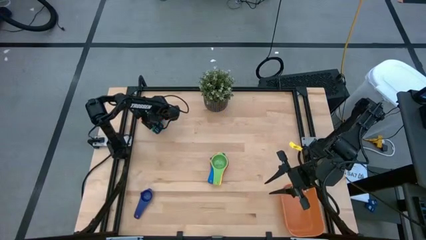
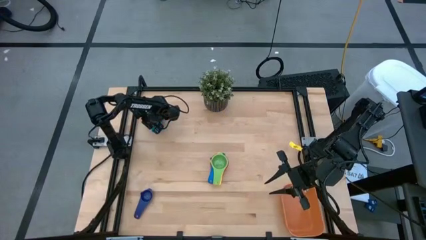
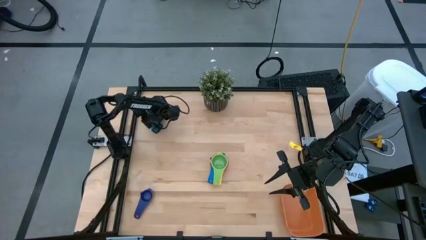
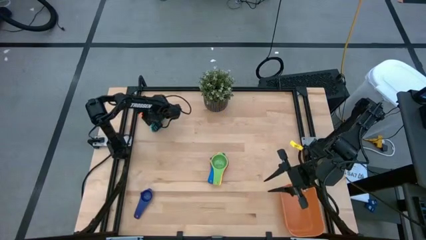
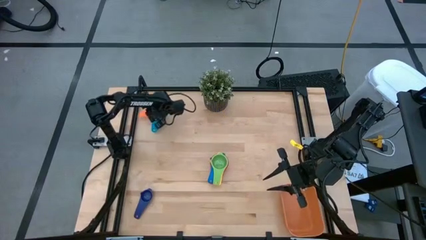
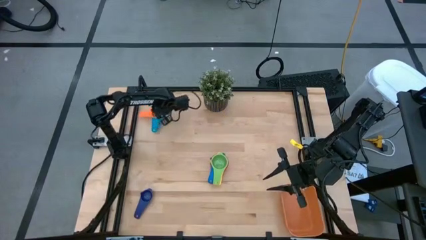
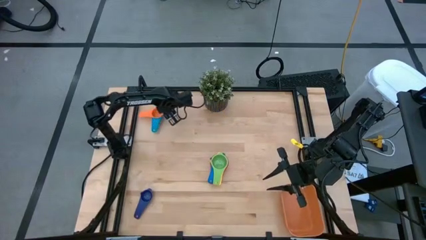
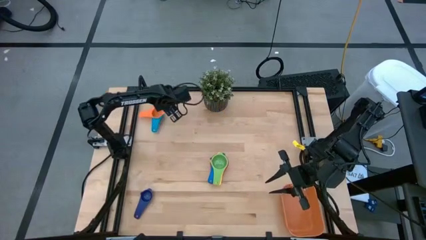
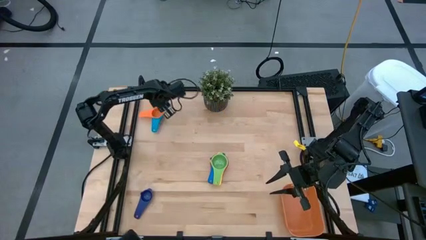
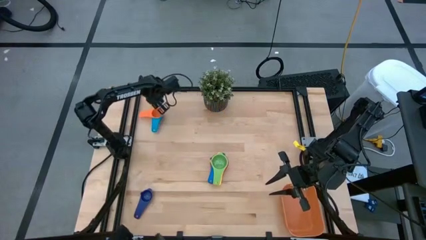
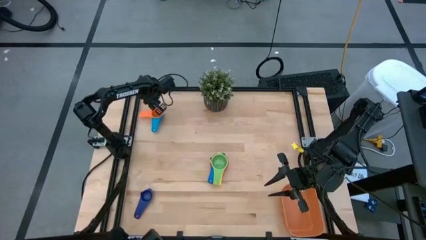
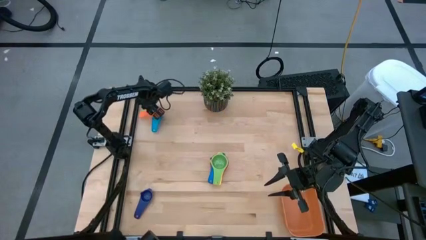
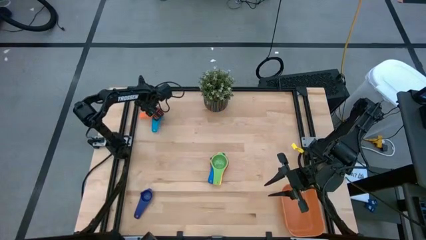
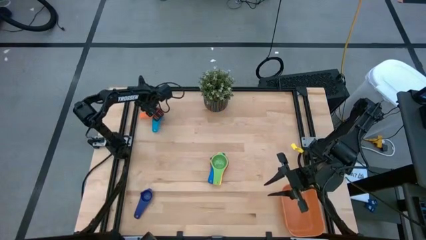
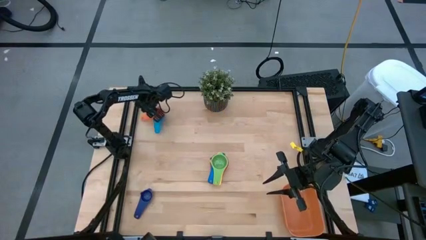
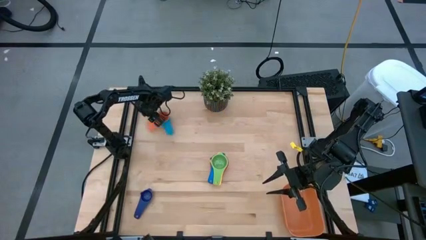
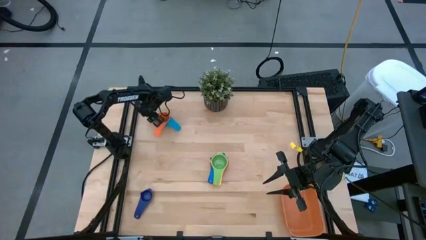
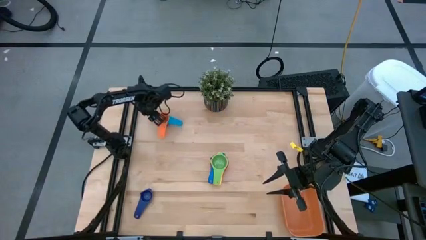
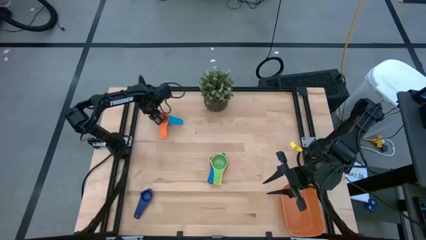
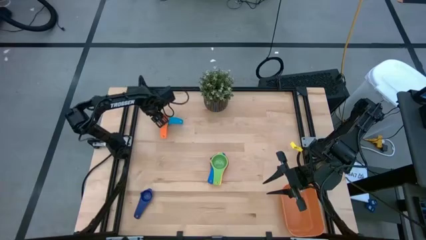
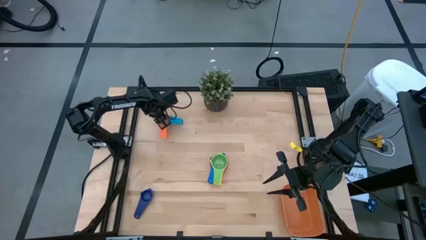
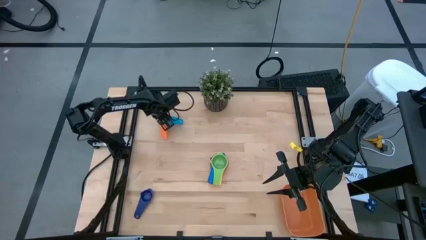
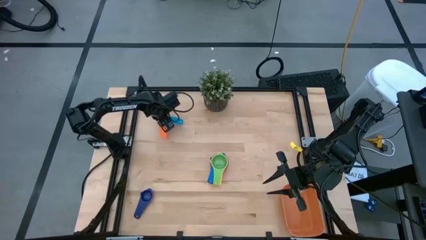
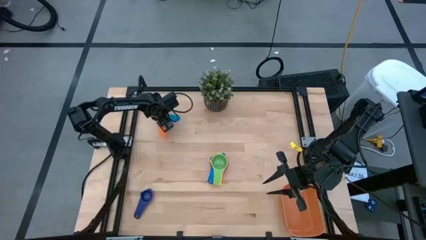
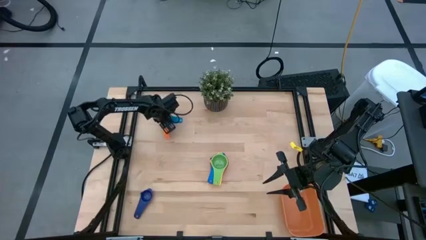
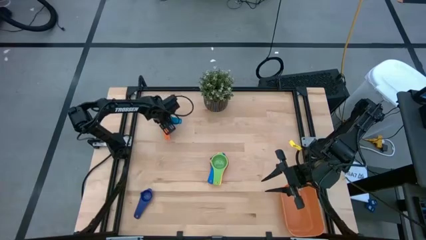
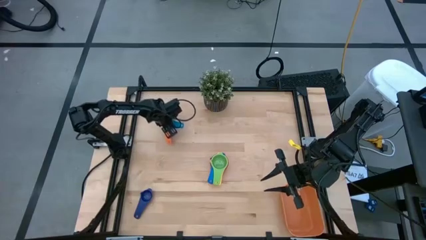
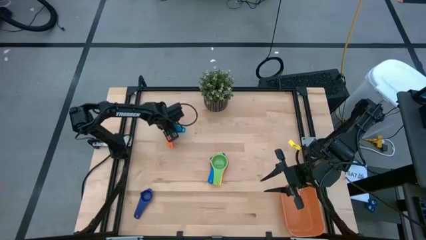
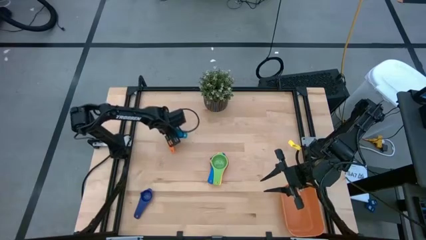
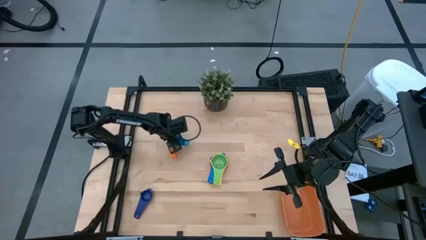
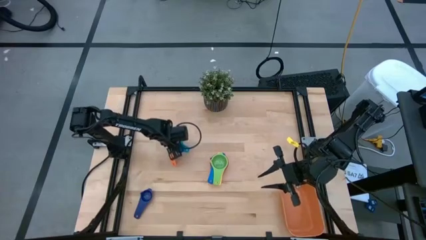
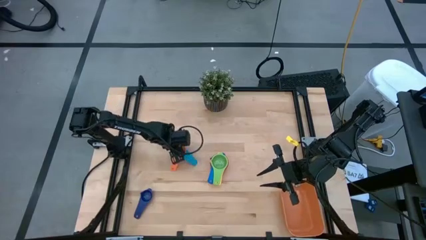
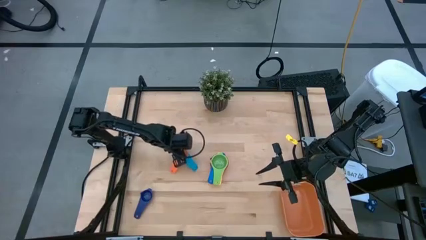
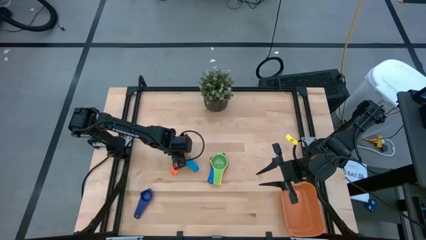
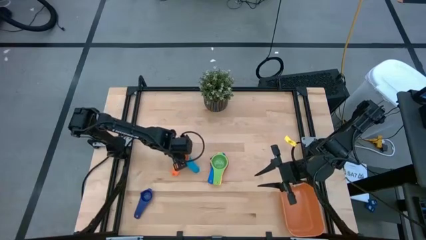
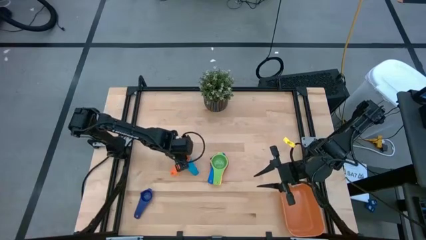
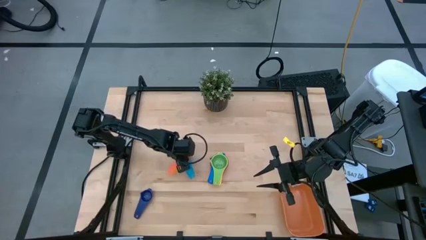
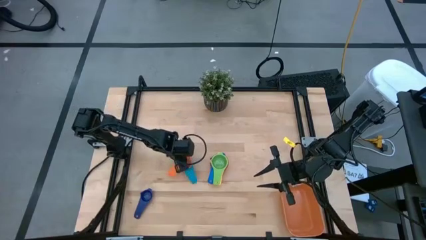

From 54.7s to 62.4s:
Task: Nest measuring cups in basket
Move the nested light blue and orange measuring cups to the left of the other nested measuring cups

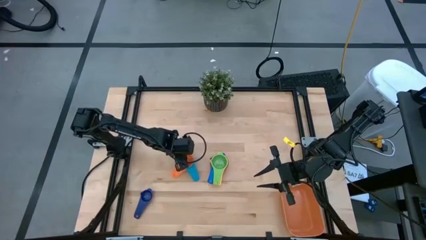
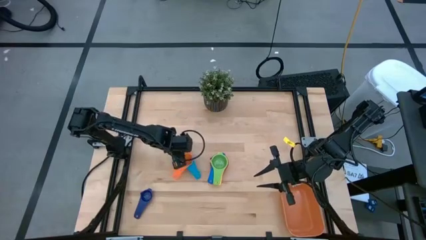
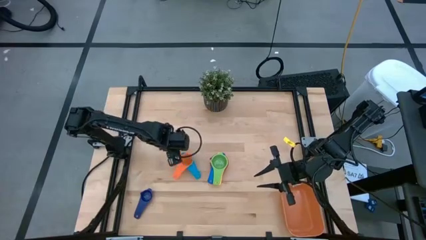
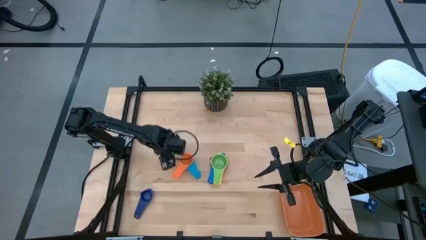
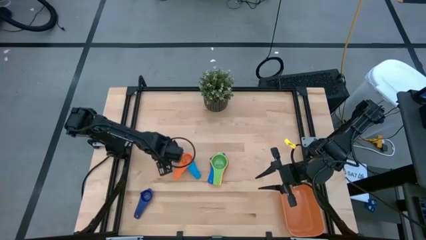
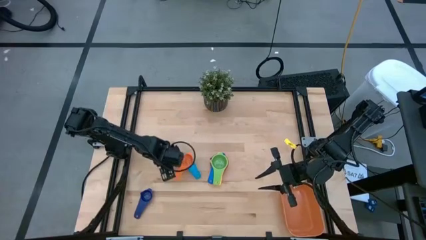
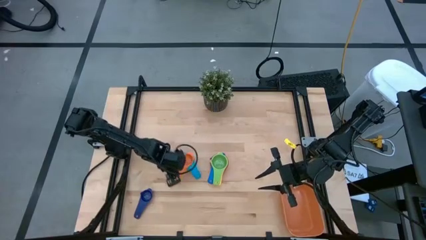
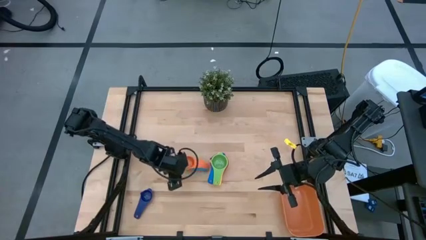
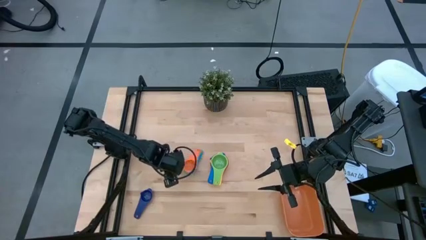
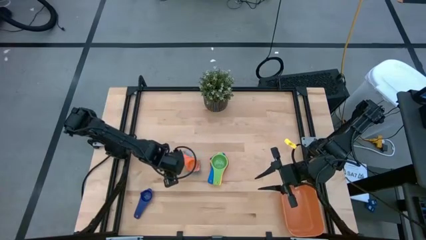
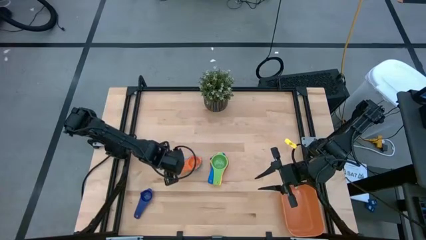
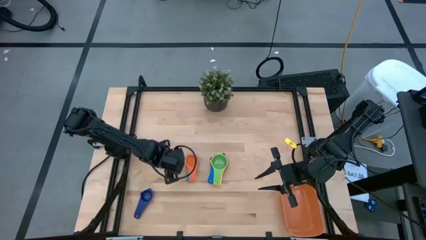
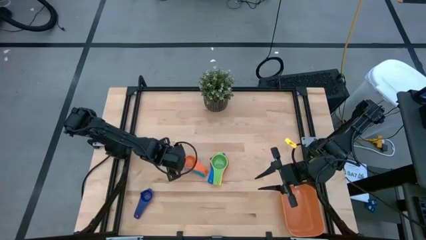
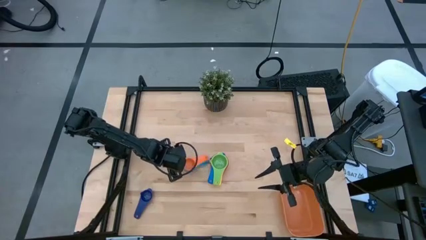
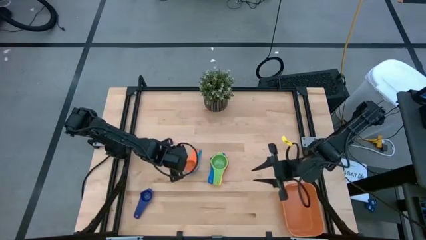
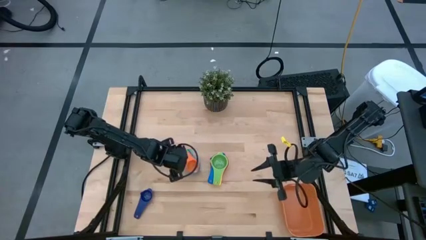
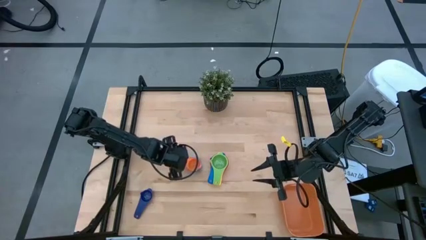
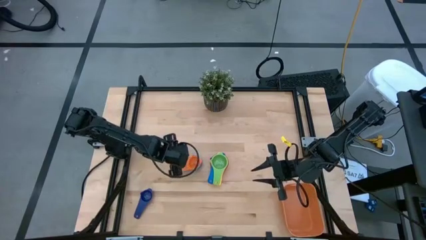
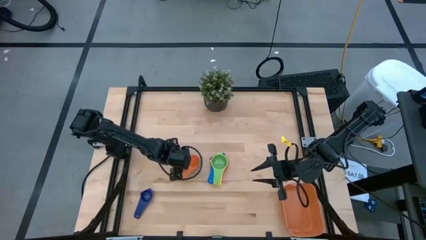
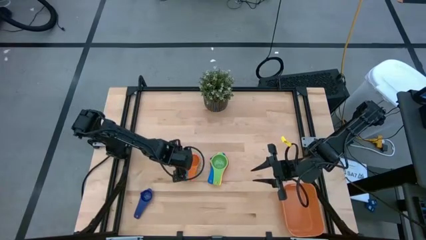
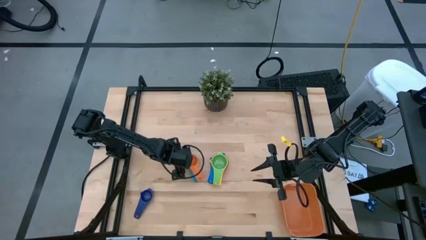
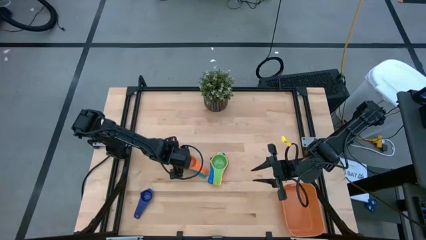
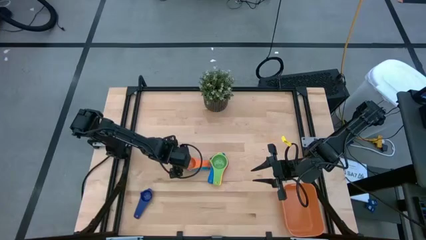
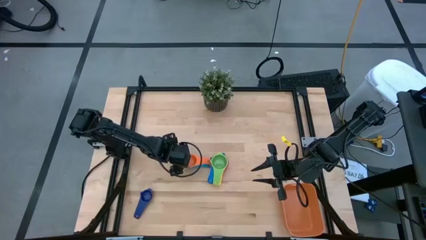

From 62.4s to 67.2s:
Adjust the nested light blue and orange measuring cups
